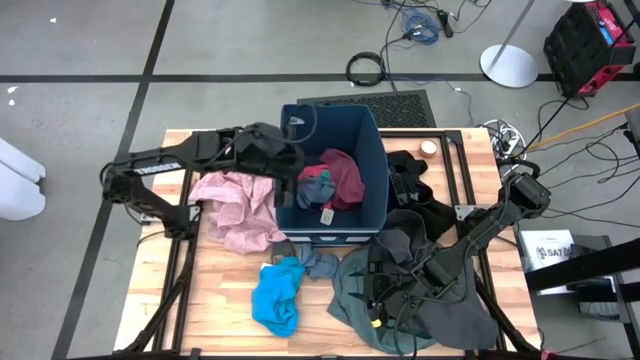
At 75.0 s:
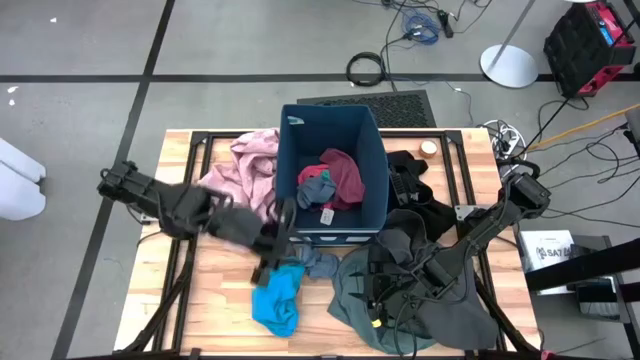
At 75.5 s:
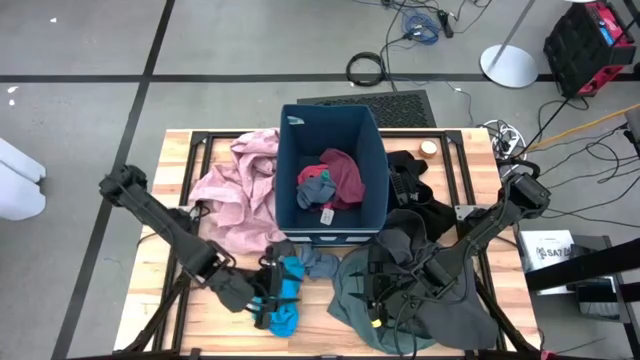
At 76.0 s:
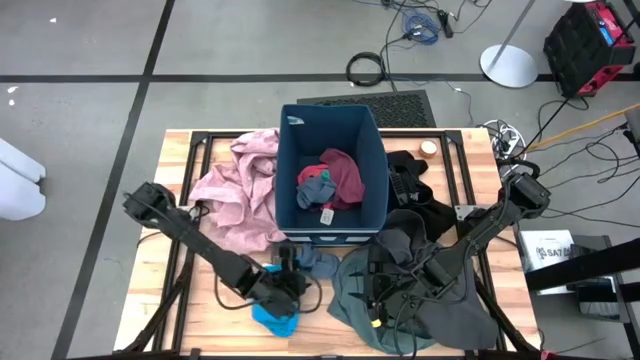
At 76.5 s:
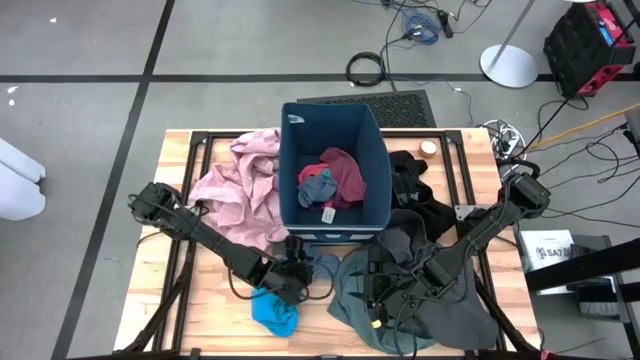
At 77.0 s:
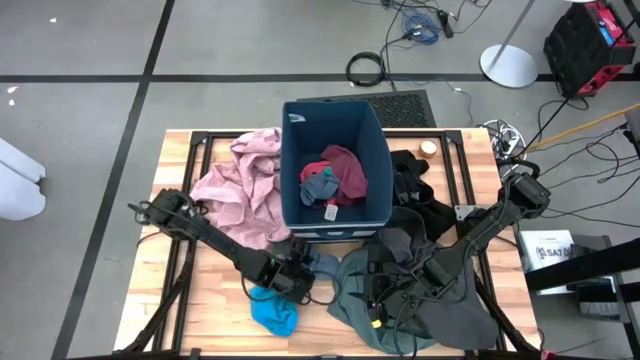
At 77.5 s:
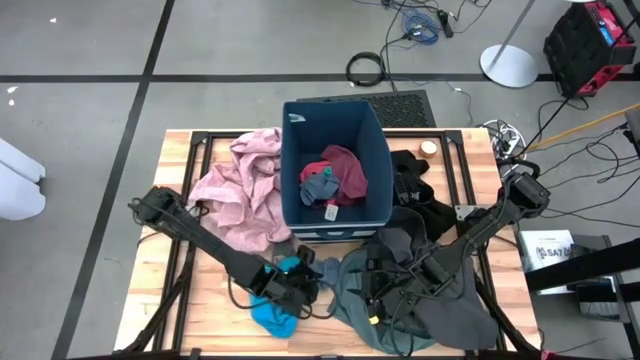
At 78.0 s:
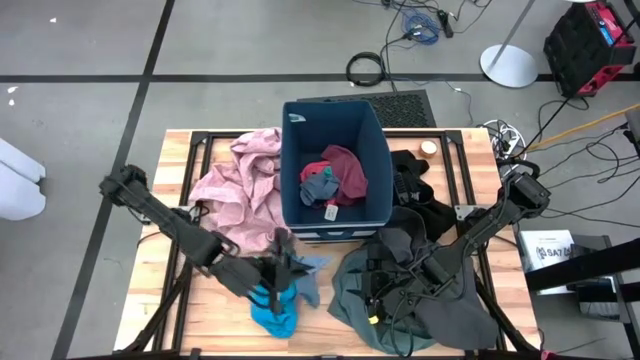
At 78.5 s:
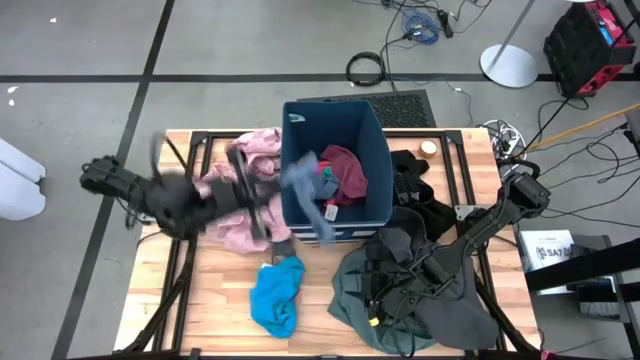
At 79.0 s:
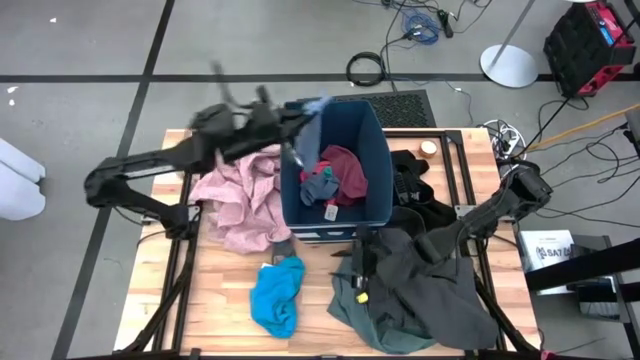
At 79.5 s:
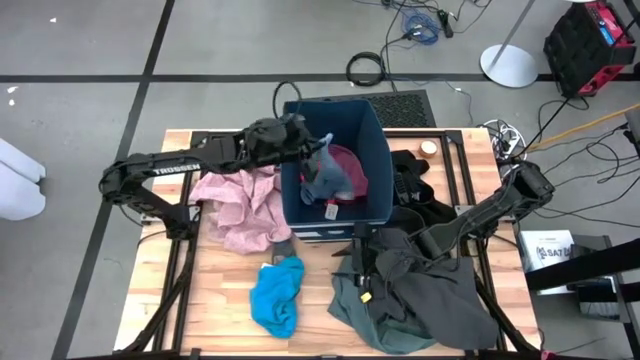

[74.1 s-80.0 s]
Task: Sort clothes
Put the blue sock into the blue laundry organizer

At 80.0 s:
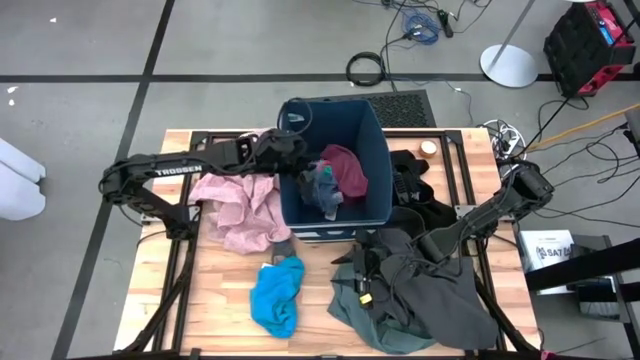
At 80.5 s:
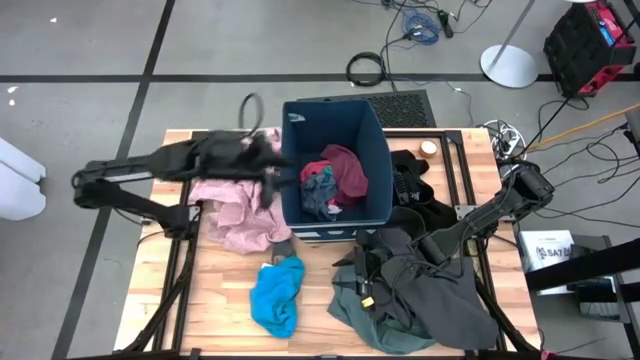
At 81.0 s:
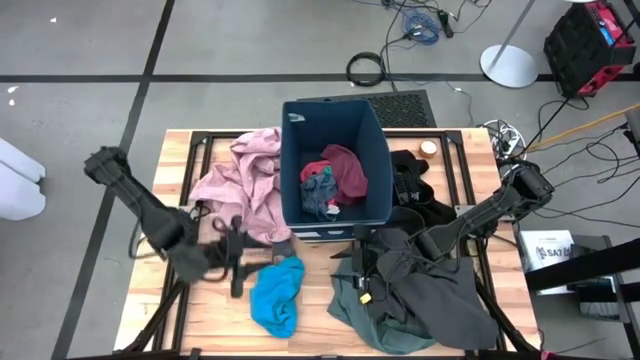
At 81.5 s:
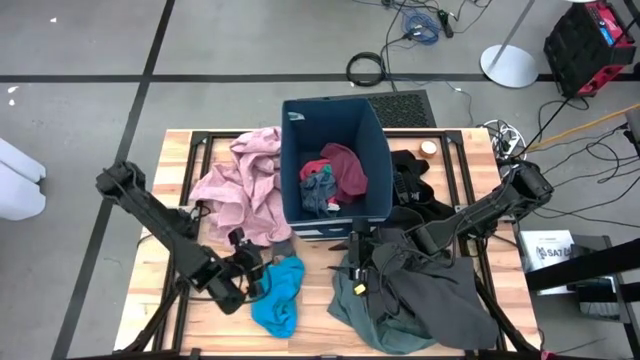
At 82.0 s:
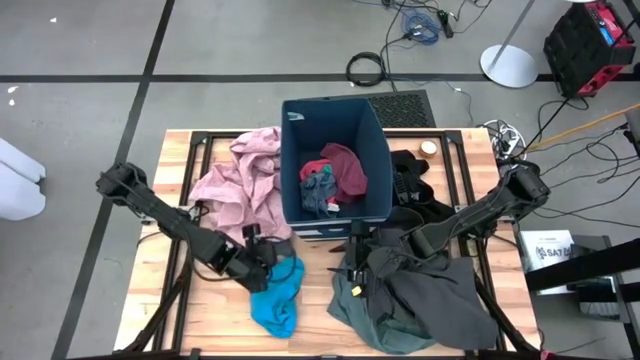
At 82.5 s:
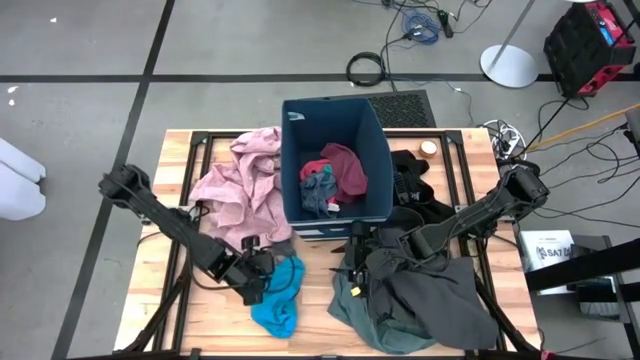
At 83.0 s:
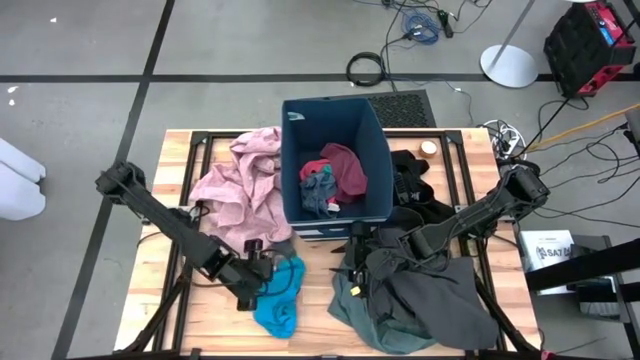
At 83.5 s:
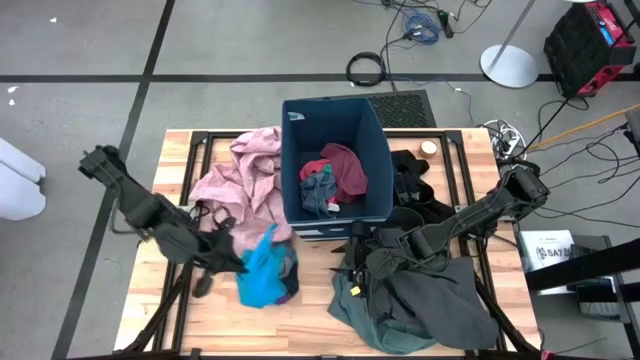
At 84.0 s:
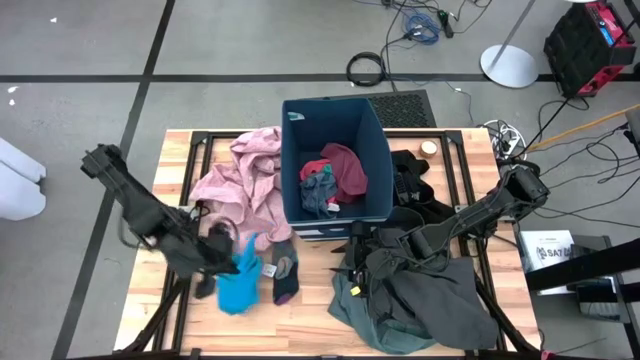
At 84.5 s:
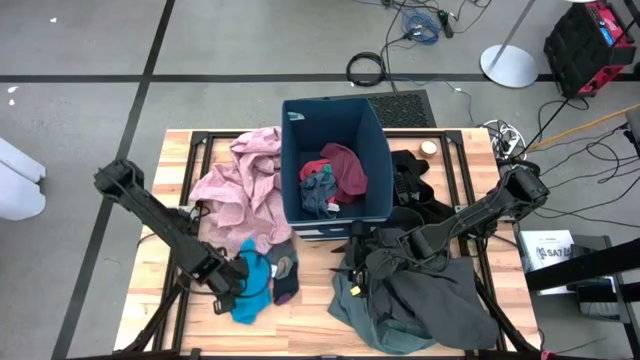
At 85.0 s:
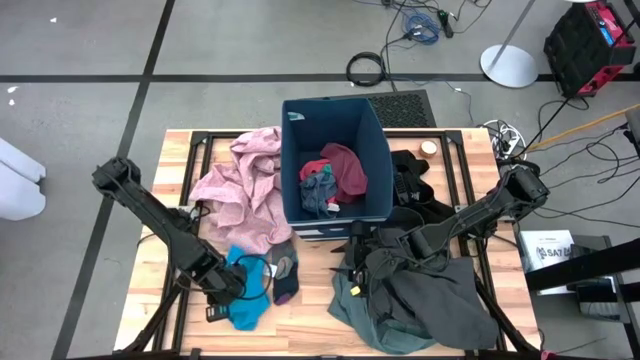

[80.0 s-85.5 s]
Adjust the blue pants

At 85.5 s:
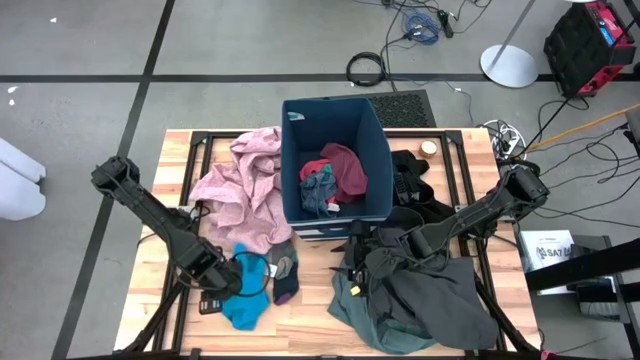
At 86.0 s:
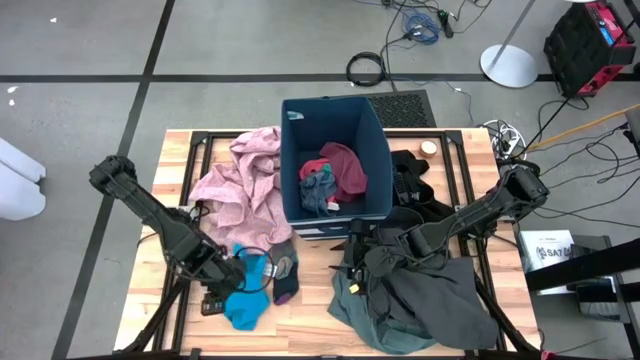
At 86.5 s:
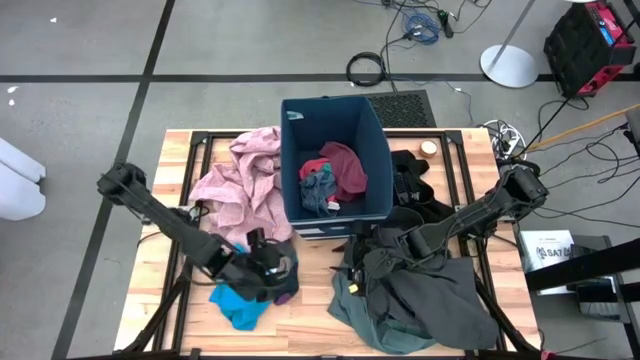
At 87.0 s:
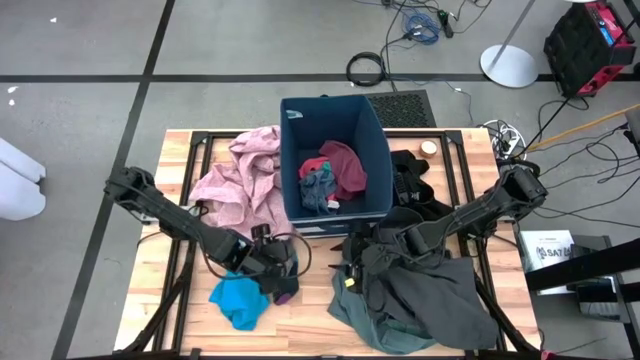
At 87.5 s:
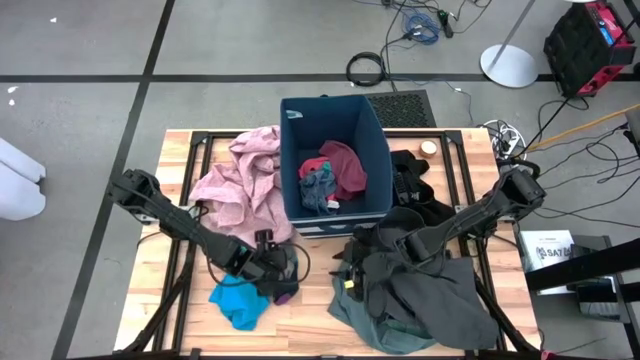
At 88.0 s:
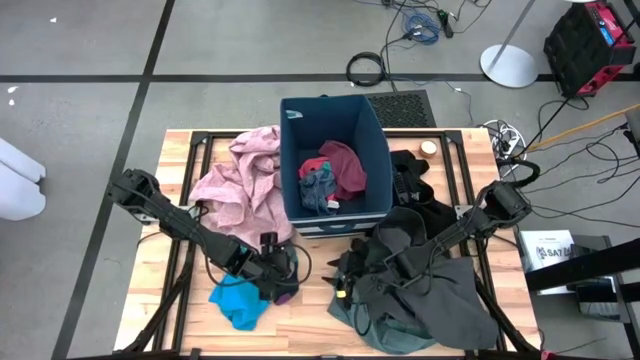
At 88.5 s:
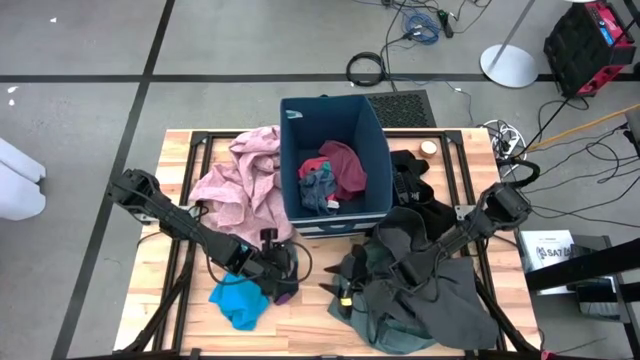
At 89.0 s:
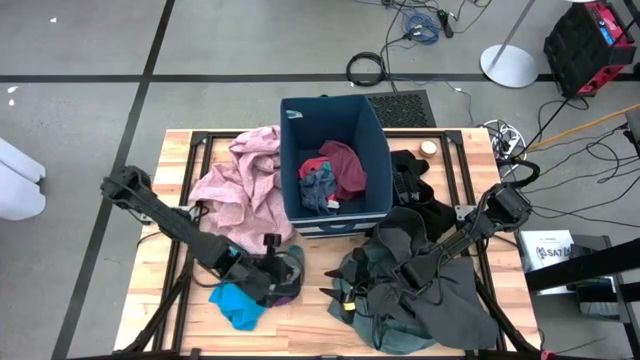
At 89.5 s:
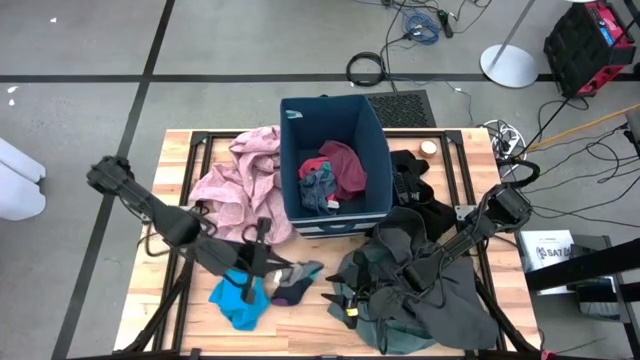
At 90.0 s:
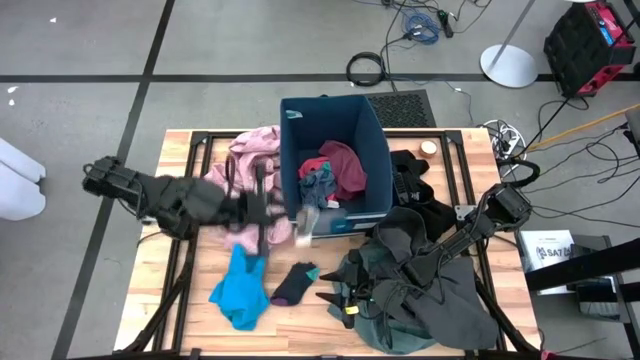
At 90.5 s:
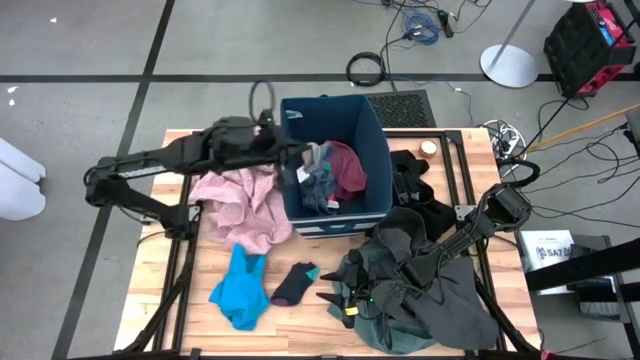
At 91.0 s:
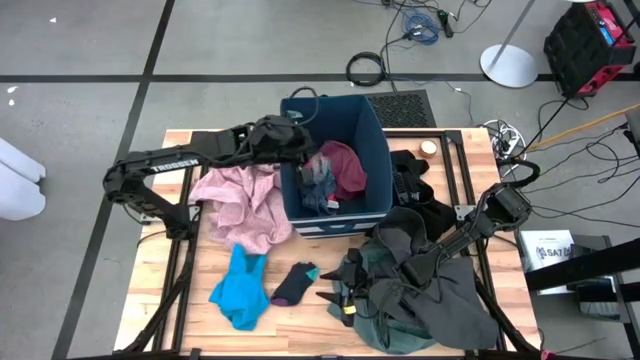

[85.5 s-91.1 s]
Put the gray purple sock into the blue laundry organizer

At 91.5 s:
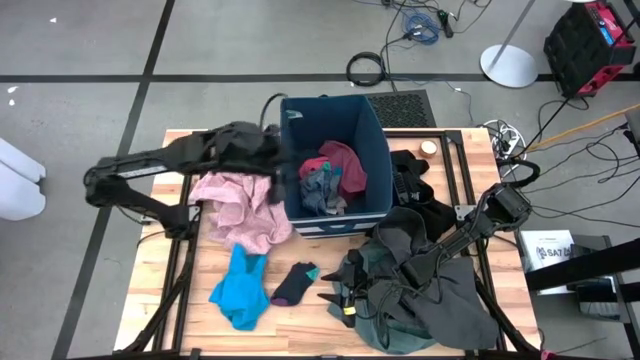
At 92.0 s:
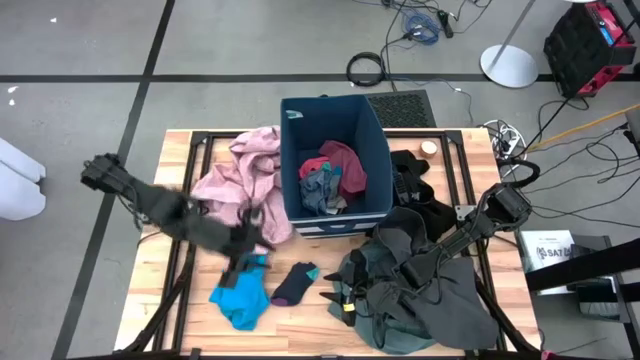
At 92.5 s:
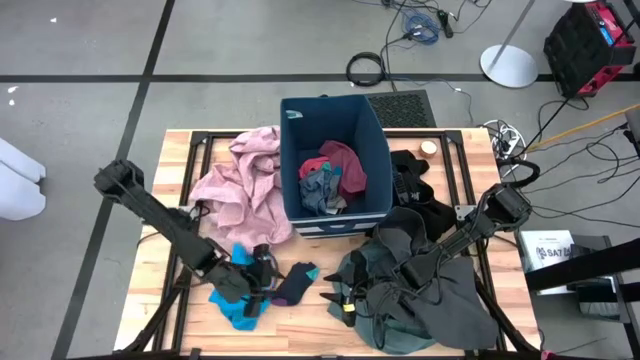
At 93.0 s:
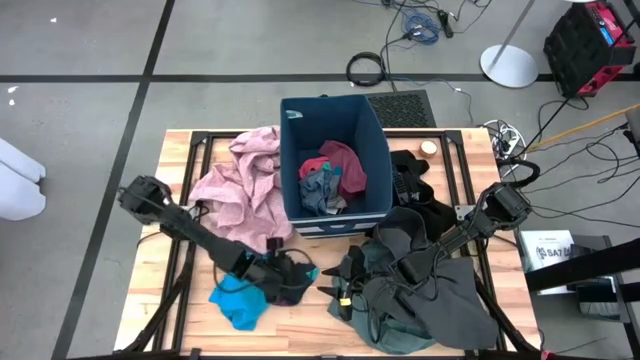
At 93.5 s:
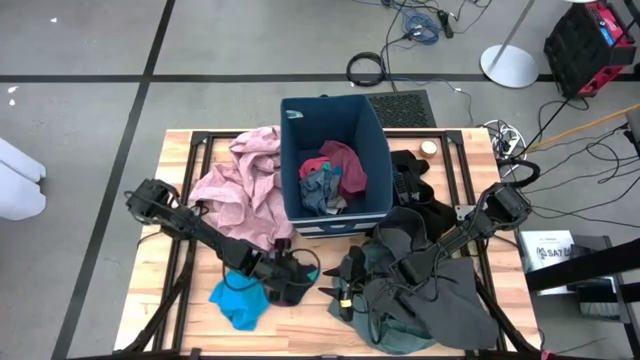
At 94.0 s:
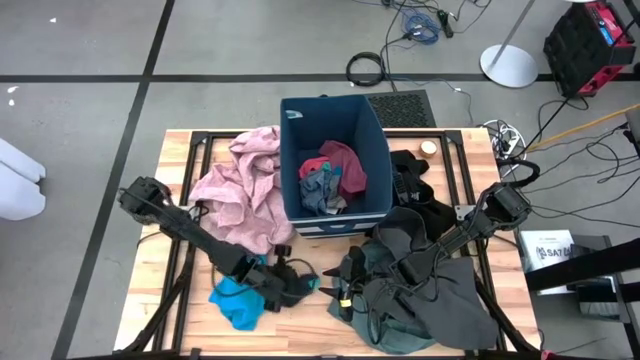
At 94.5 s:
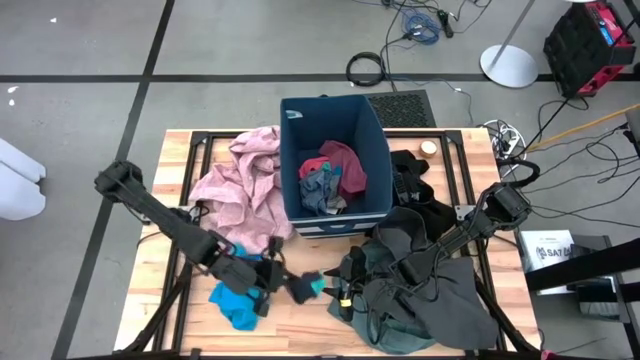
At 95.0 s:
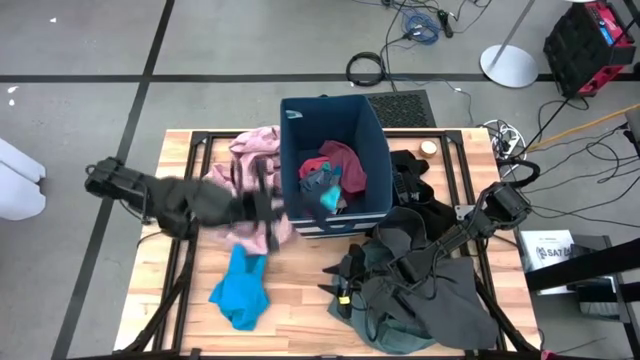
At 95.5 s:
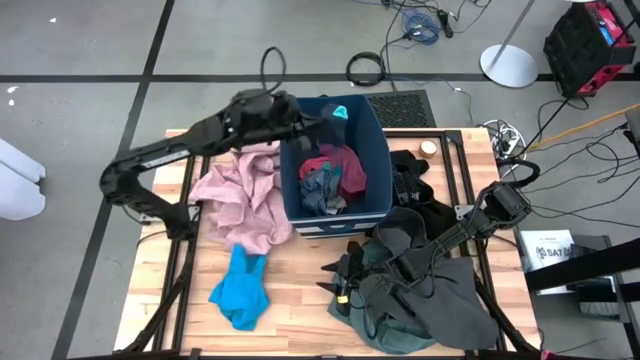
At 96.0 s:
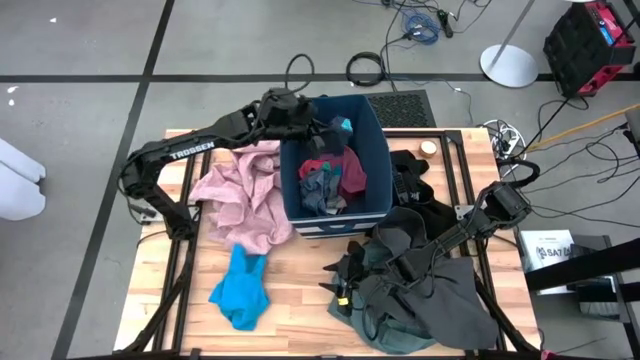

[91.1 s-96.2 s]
Put the dark blue sock into the blue laundry organizer
